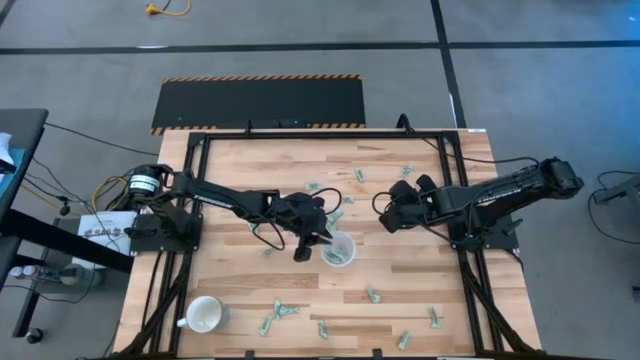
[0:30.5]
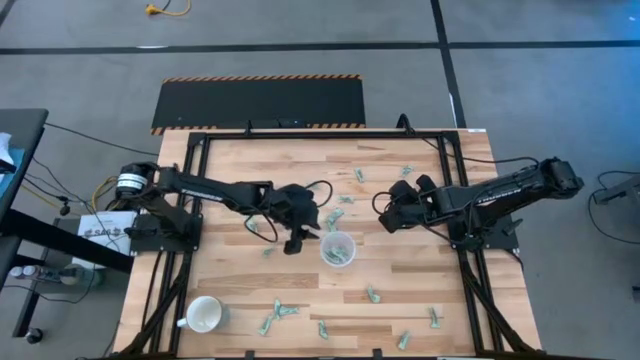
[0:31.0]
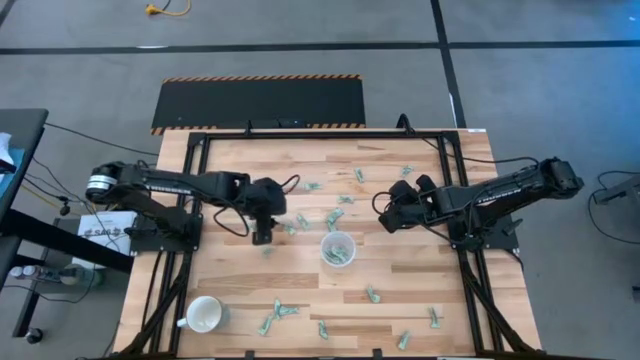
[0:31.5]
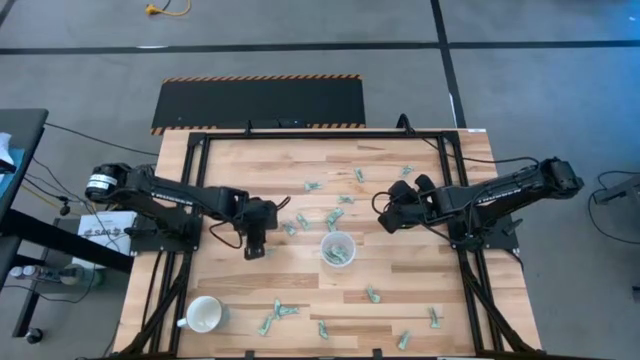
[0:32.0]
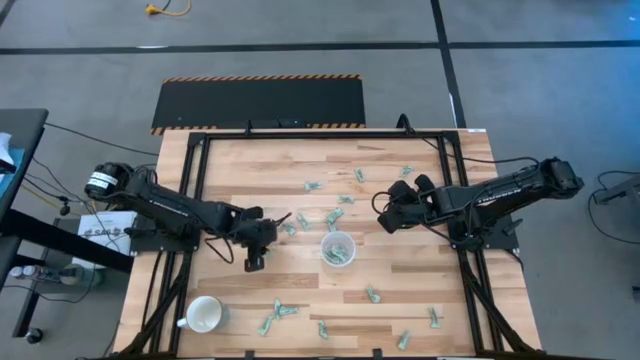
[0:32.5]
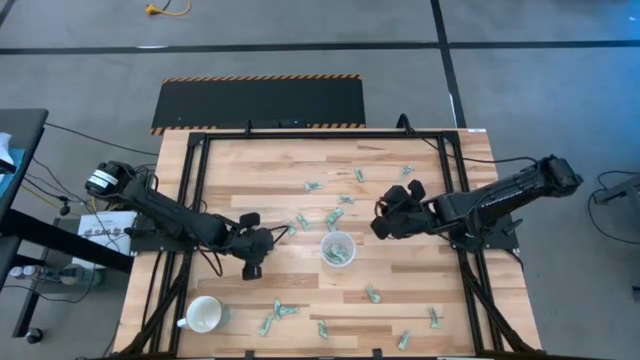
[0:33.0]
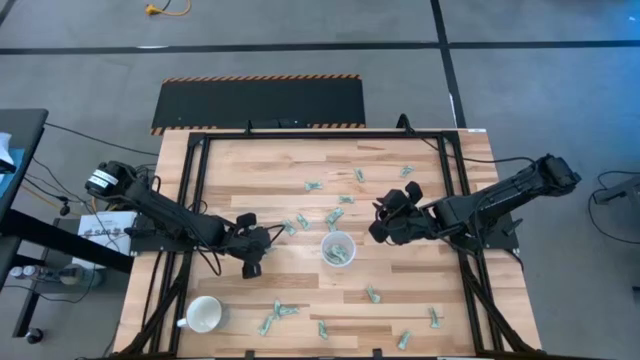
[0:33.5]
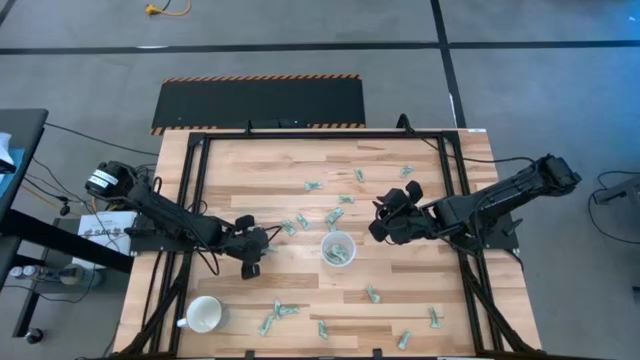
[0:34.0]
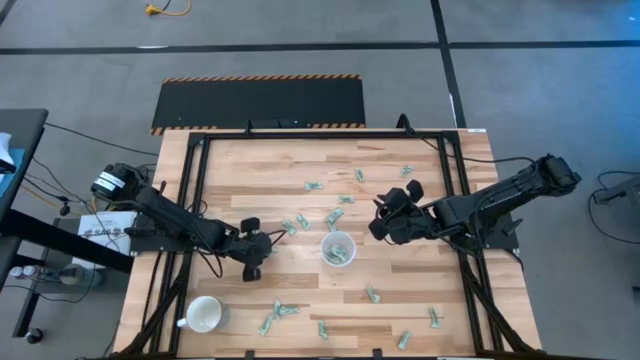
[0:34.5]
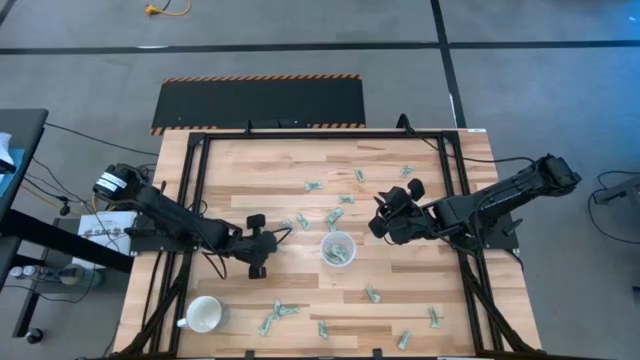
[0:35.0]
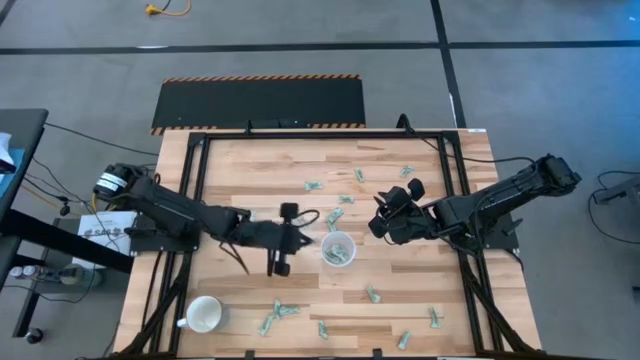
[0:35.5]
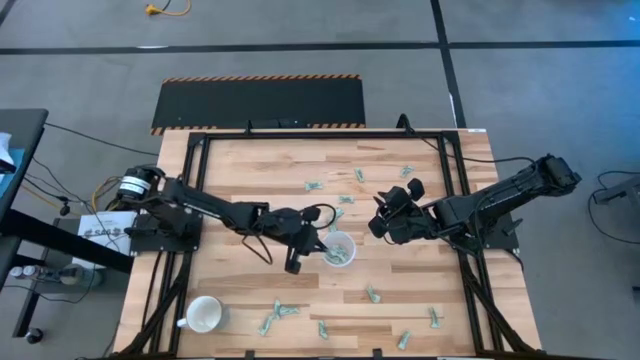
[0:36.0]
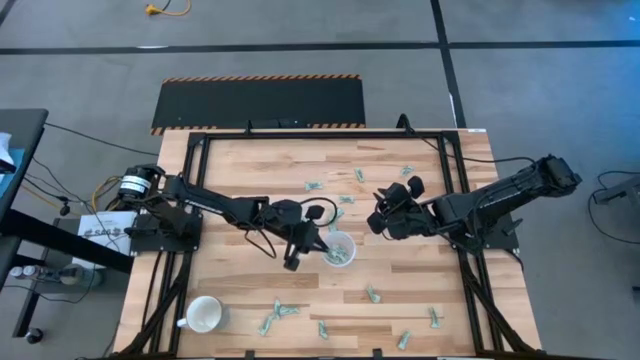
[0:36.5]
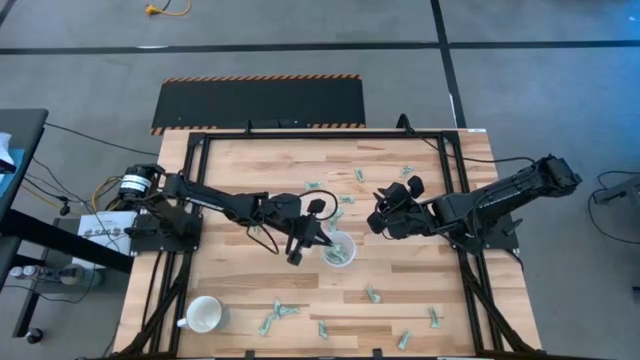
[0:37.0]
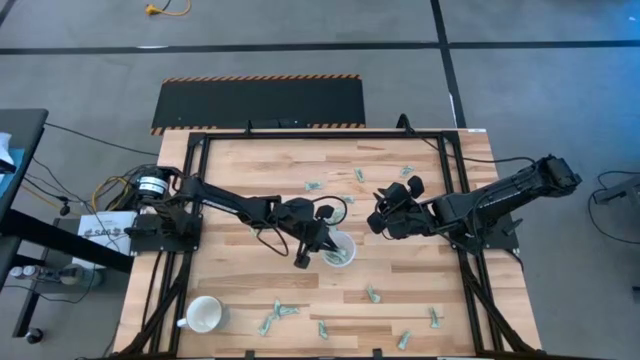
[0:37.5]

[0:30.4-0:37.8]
Task: Pick and place Stevia / Truvia into bins
Put the stevia packet into the transparent container

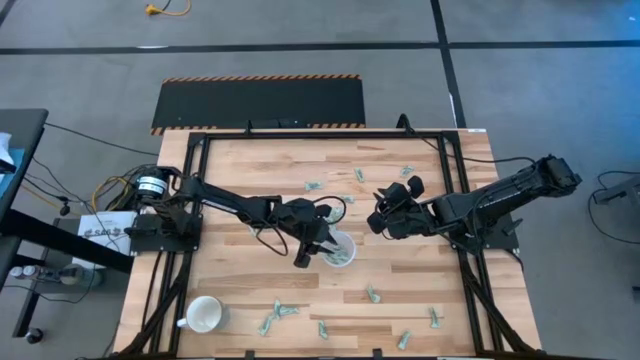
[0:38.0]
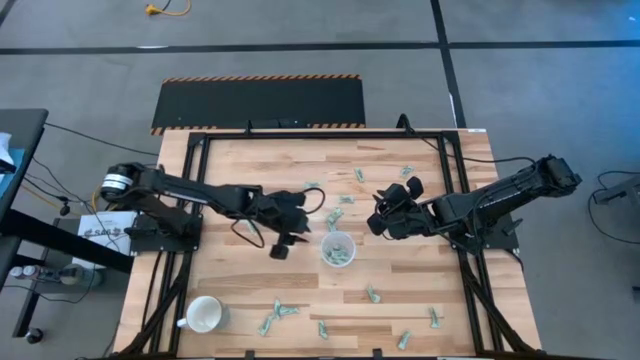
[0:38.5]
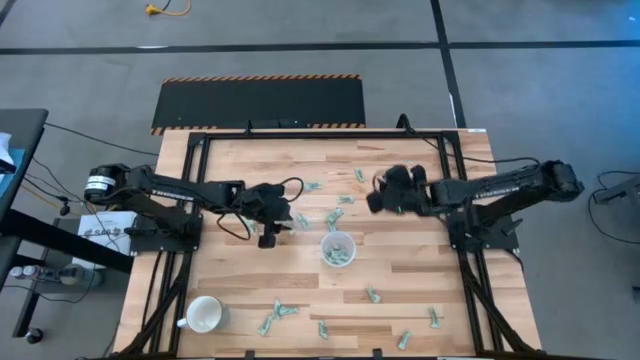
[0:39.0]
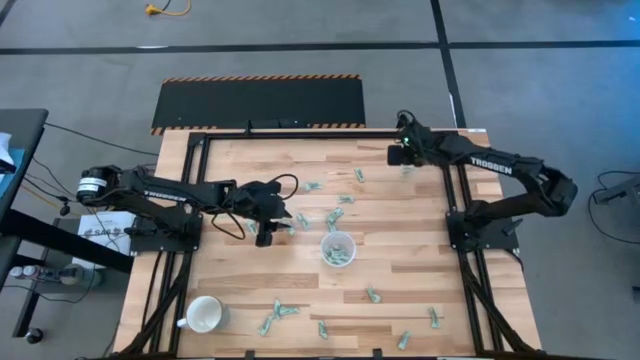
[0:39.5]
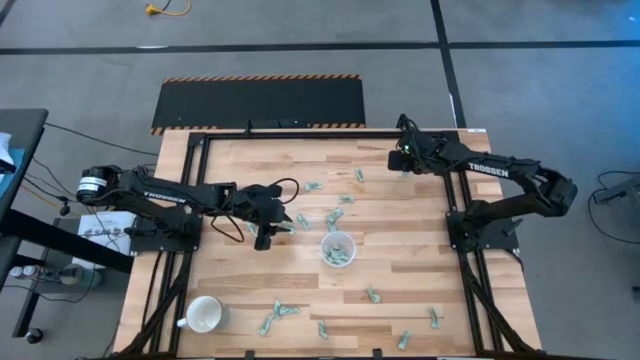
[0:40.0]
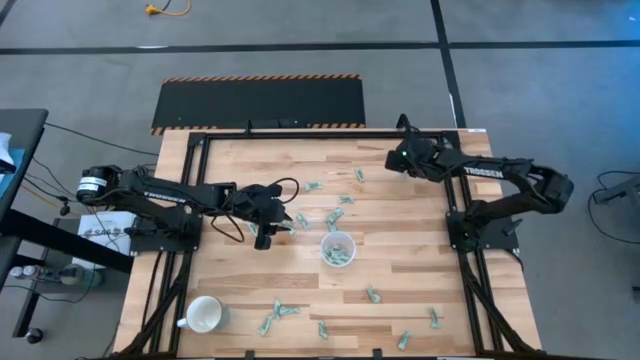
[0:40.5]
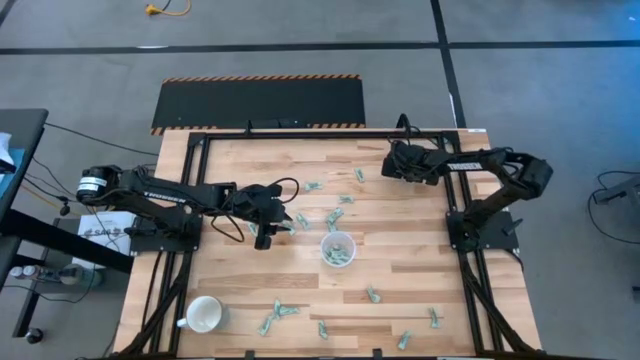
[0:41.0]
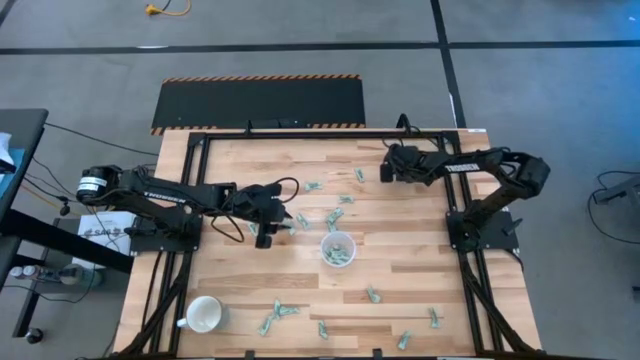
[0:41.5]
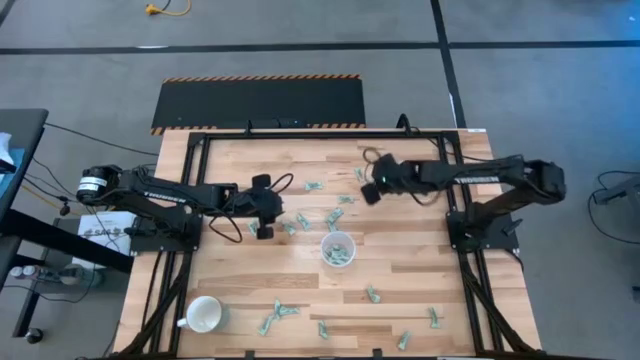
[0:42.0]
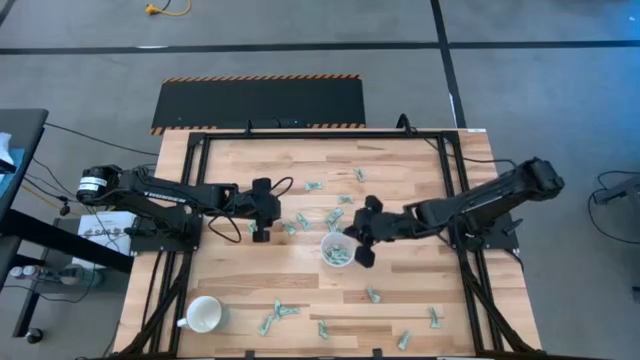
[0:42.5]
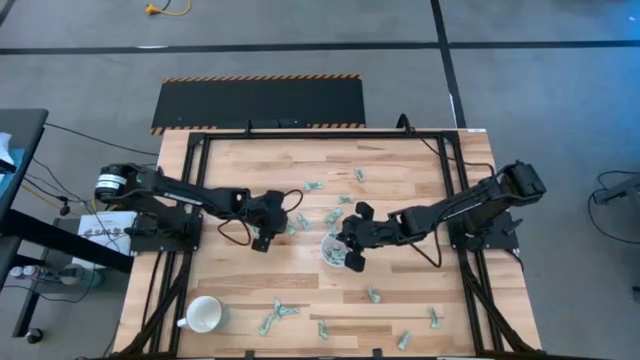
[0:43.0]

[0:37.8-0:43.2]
Put the stevia packet into the transparent container

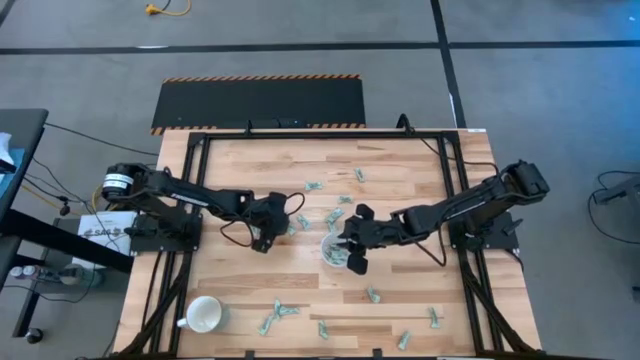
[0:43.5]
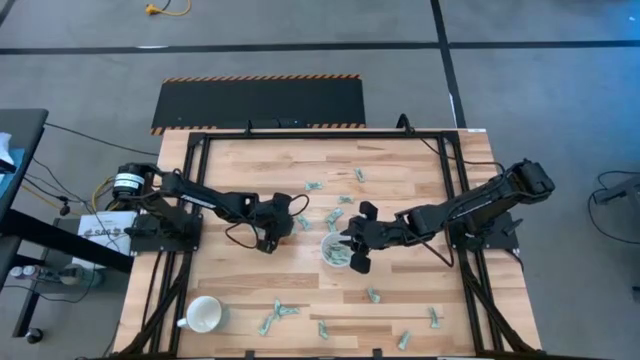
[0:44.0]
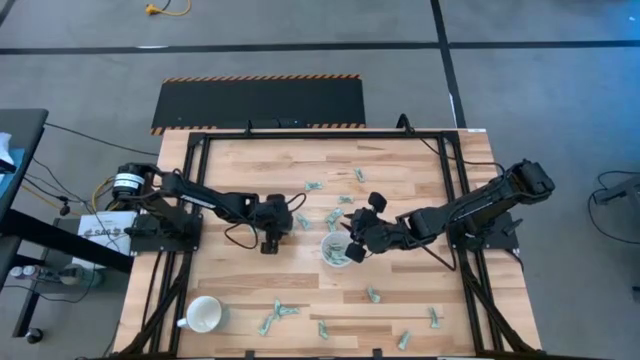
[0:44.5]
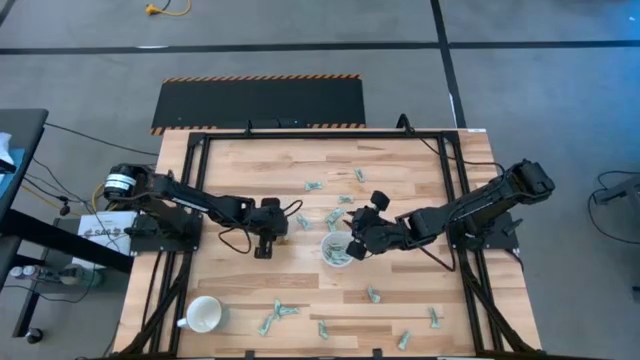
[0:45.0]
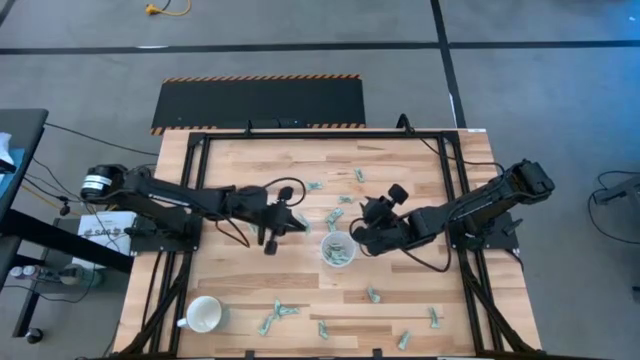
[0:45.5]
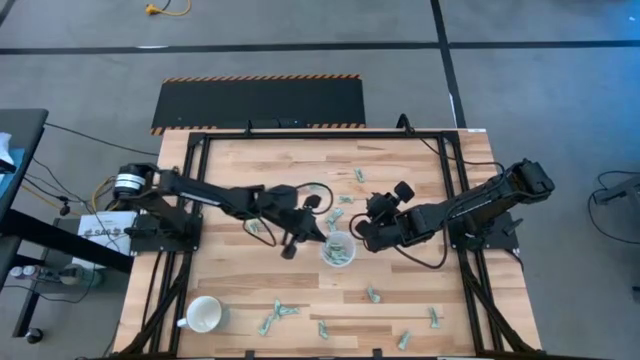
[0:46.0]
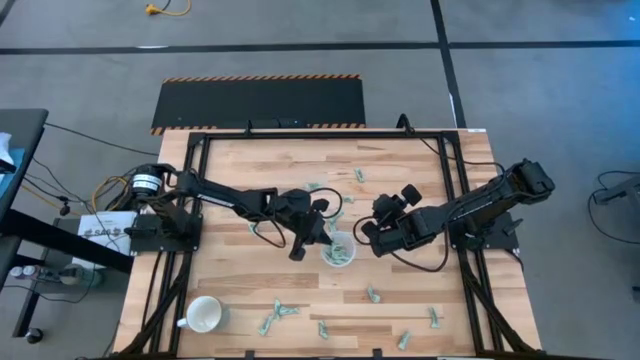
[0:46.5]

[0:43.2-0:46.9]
Put the stevia packet into the transparent container

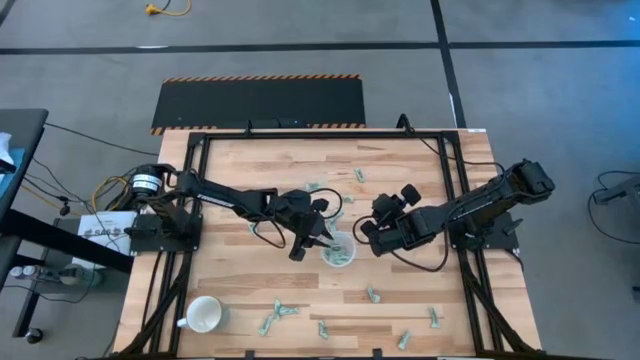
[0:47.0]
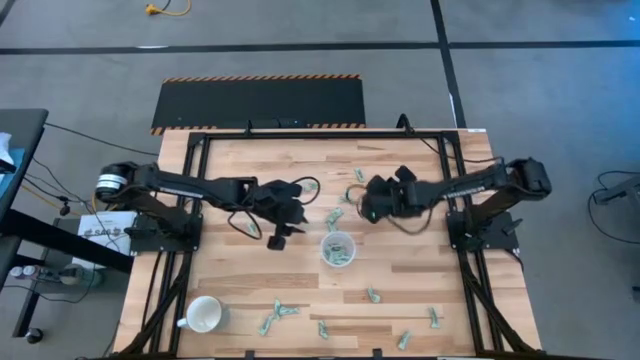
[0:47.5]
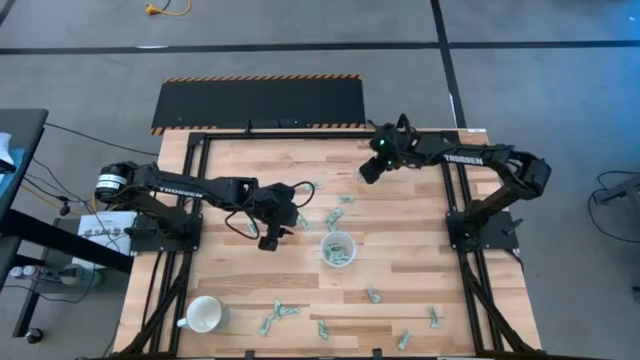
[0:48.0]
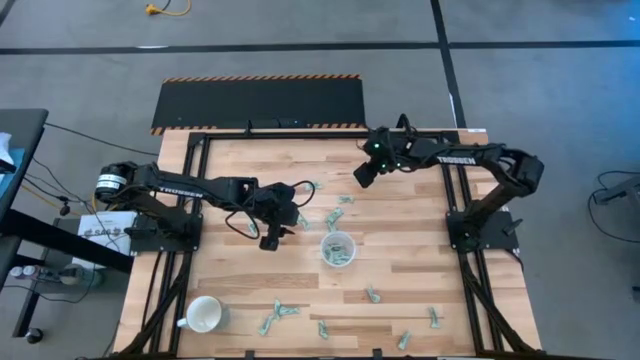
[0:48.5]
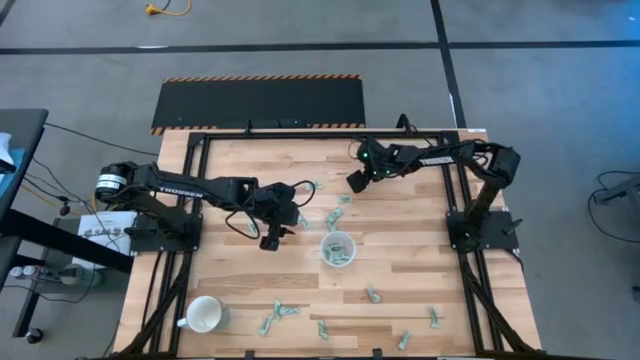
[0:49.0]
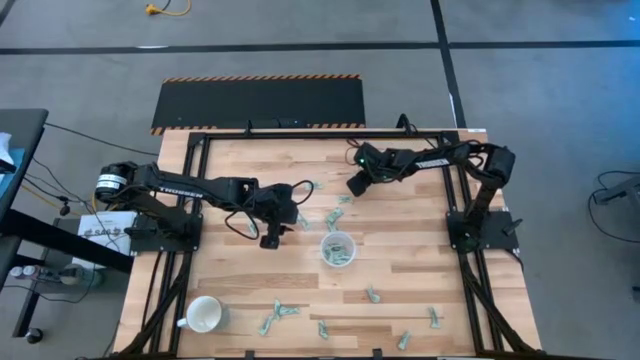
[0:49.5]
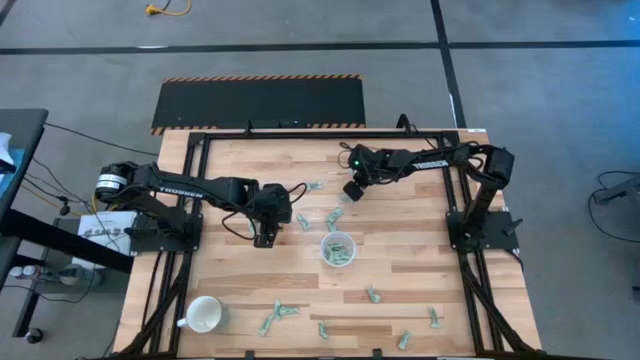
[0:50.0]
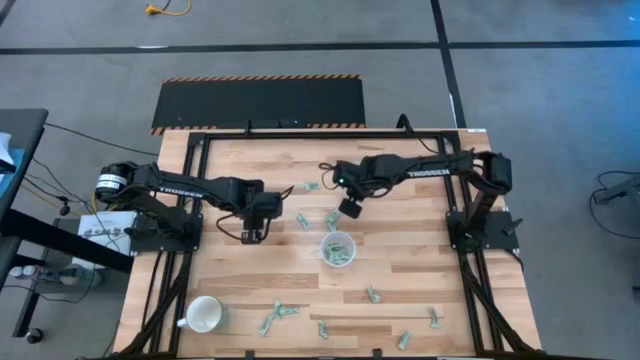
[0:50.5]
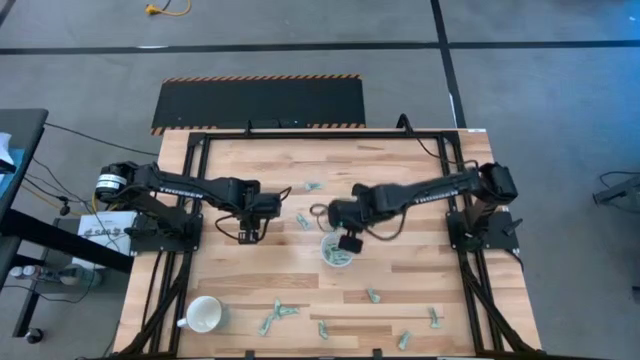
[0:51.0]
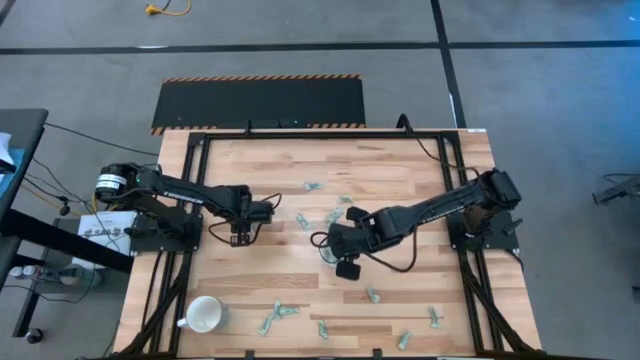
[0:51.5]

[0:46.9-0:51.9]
Put the stevia packet into the transparent container
